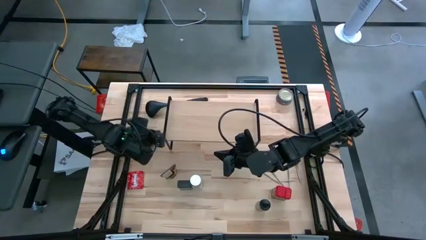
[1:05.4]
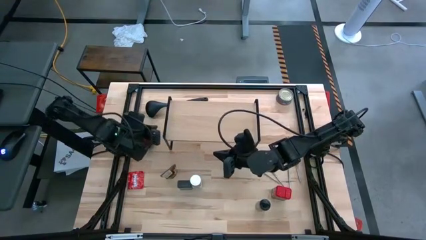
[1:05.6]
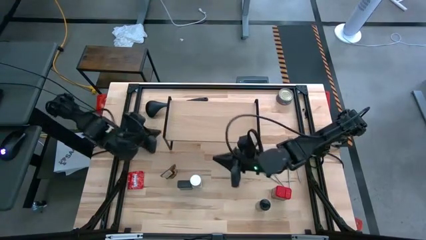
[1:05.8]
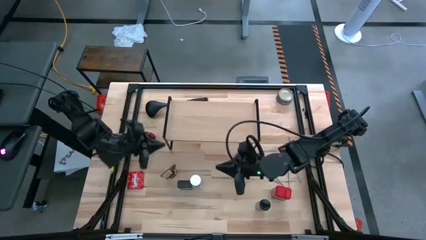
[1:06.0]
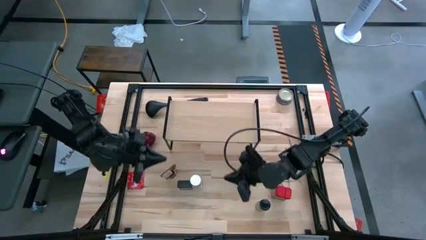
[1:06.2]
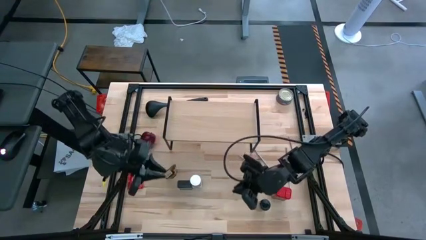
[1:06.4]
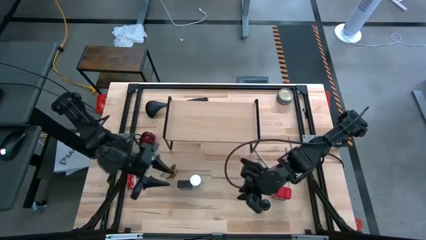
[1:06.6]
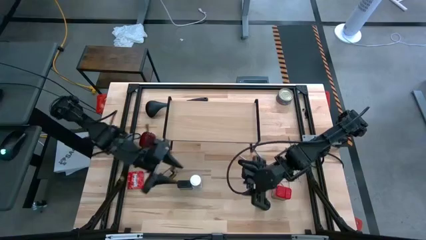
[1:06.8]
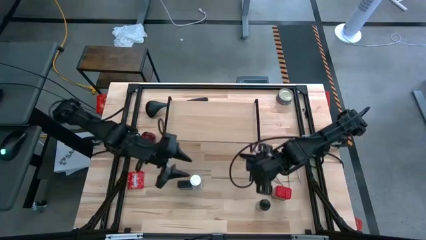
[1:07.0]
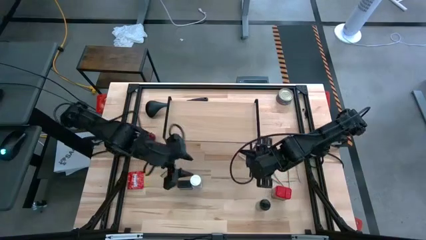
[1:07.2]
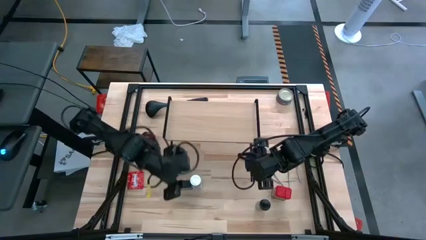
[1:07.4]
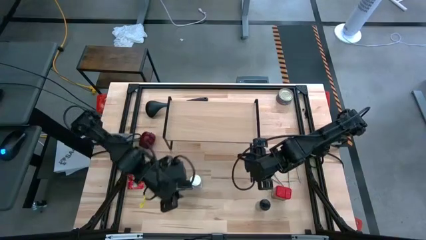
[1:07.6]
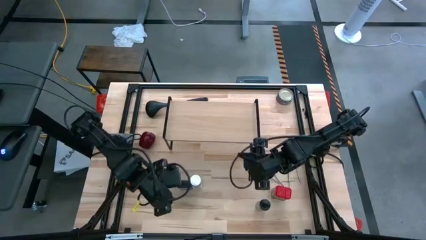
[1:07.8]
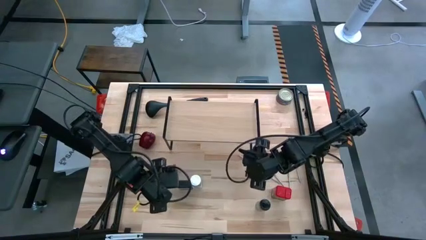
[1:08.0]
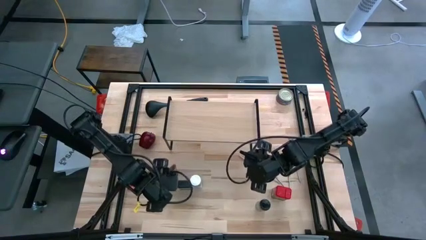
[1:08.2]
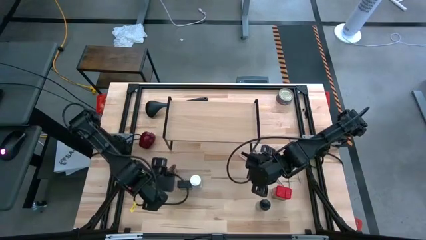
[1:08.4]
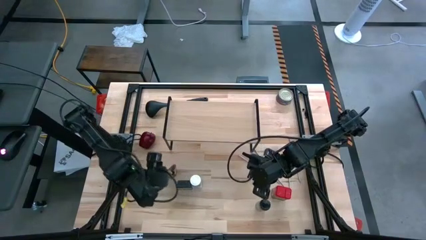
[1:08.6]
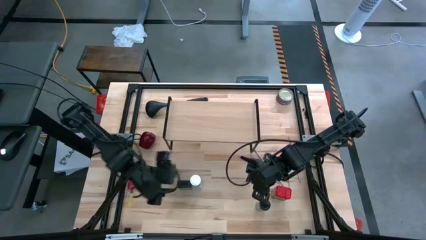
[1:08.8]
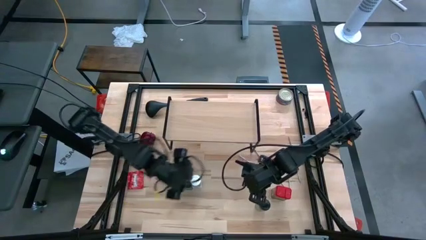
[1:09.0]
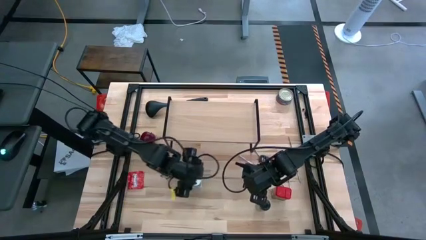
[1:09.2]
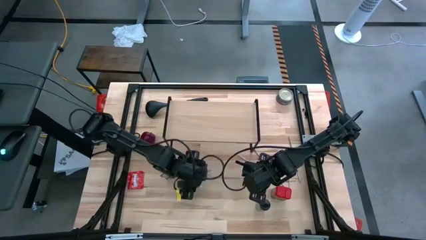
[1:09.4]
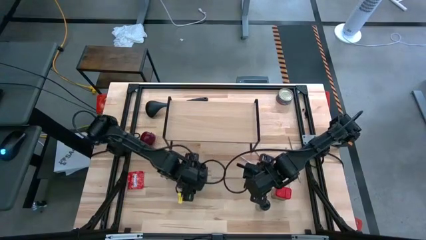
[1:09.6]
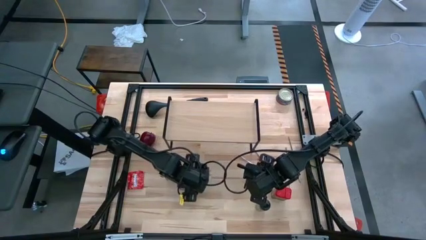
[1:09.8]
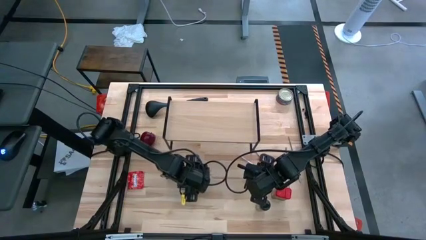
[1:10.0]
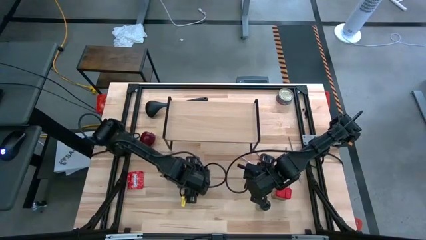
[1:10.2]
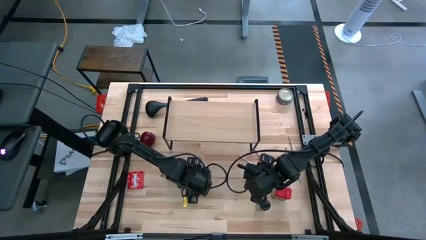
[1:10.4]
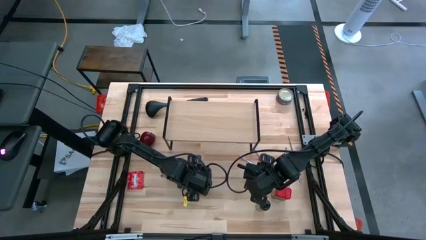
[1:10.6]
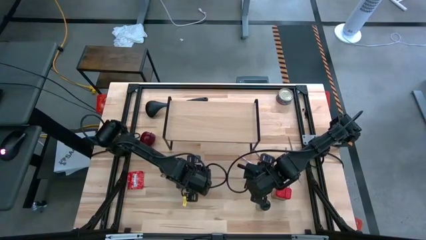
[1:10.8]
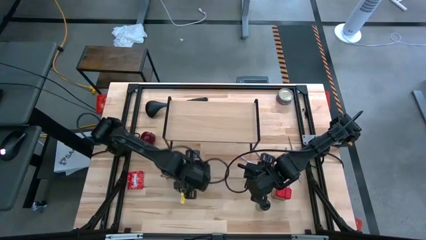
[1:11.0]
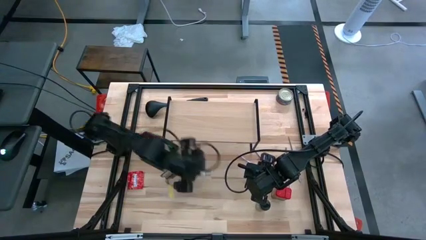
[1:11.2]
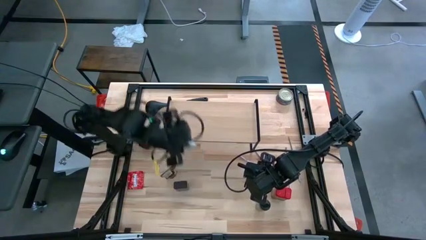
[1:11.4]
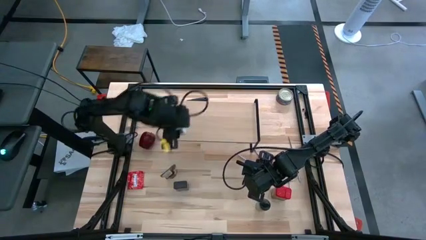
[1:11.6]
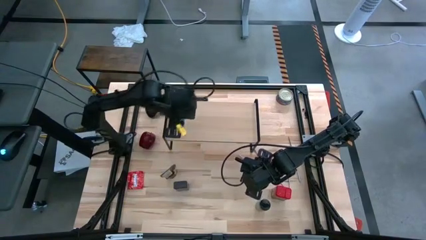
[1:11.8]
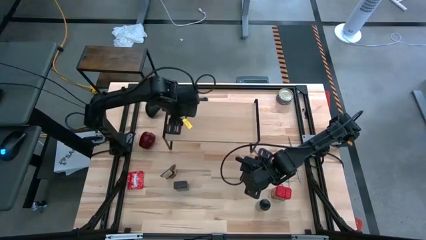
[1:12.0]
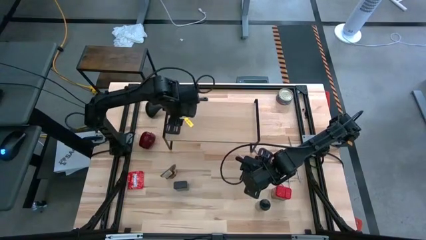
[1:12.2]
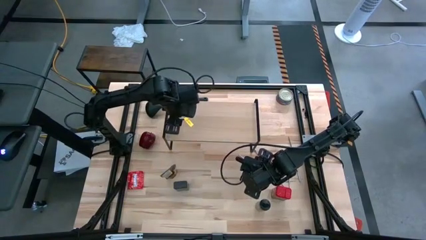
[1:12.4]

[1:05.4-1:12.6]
Task: Shelf spices
Put the white seasoning bottle on the shelf

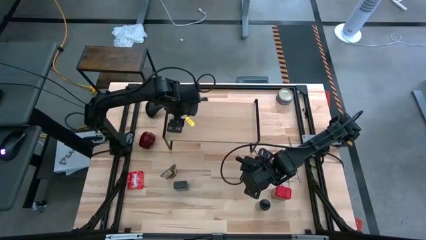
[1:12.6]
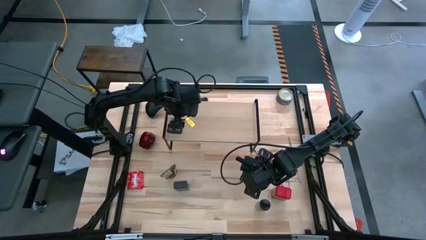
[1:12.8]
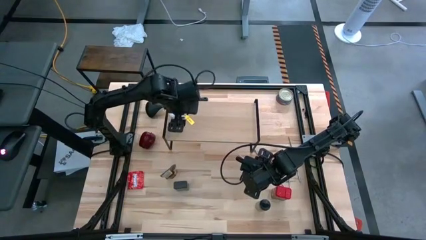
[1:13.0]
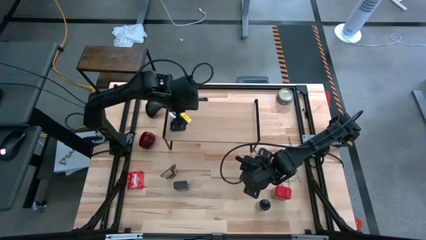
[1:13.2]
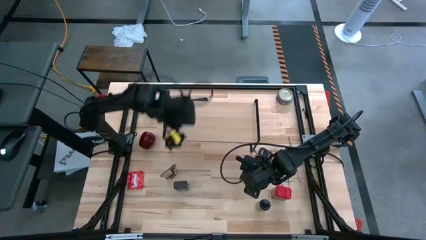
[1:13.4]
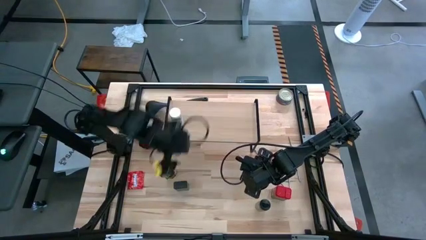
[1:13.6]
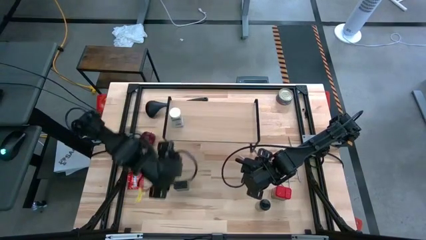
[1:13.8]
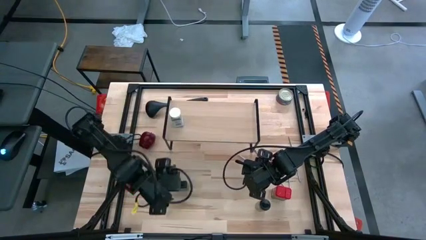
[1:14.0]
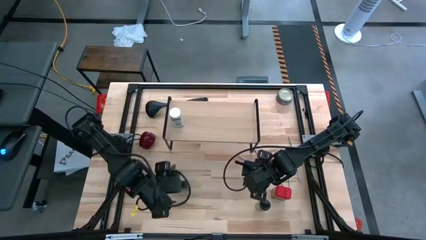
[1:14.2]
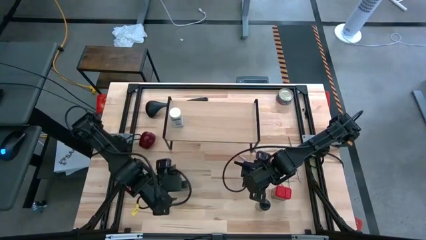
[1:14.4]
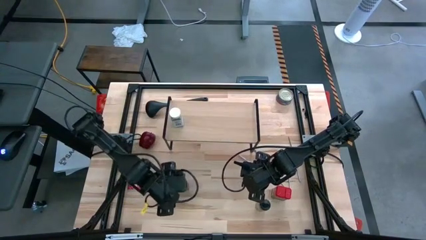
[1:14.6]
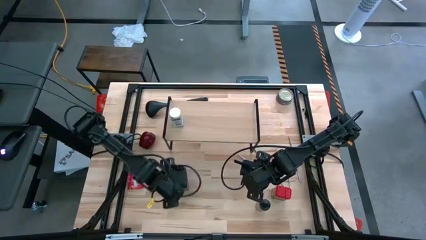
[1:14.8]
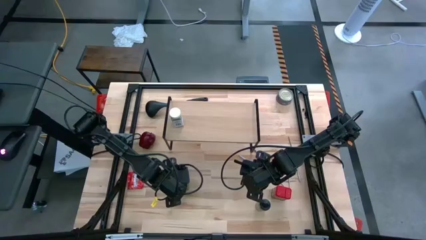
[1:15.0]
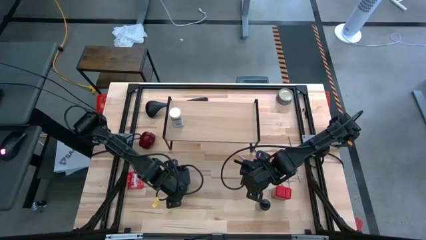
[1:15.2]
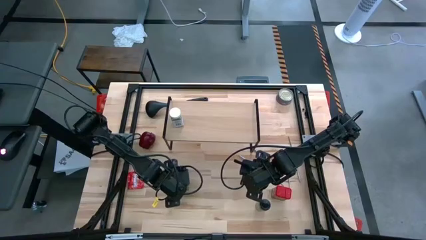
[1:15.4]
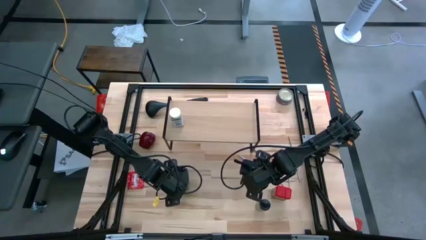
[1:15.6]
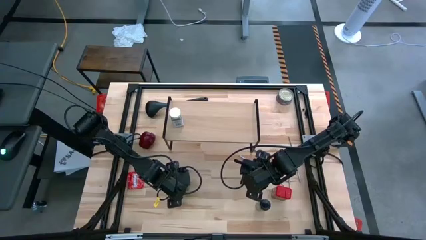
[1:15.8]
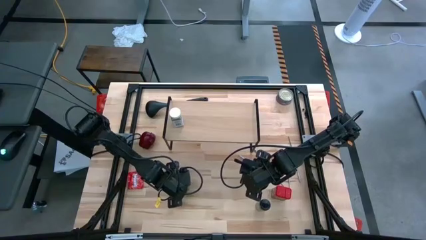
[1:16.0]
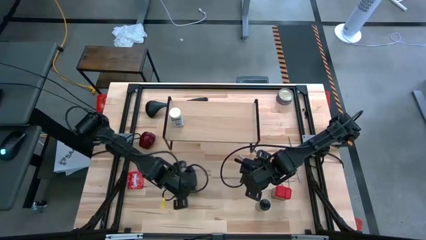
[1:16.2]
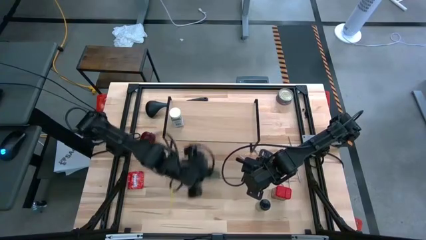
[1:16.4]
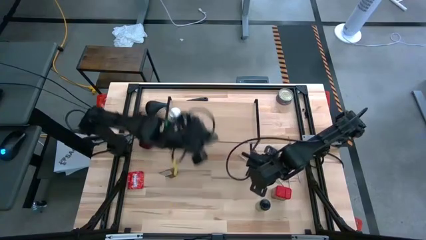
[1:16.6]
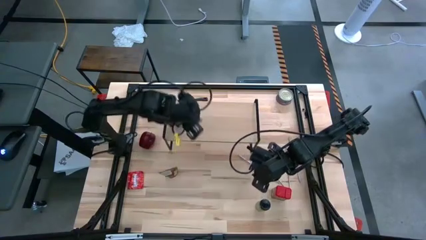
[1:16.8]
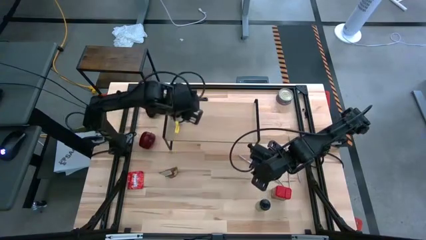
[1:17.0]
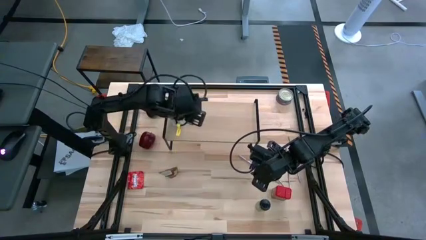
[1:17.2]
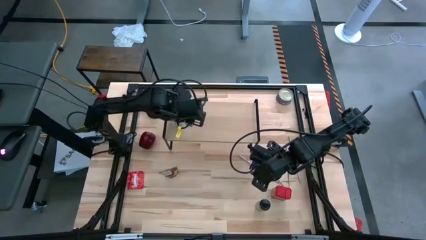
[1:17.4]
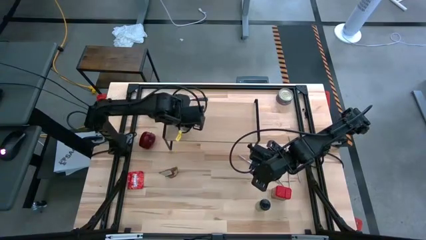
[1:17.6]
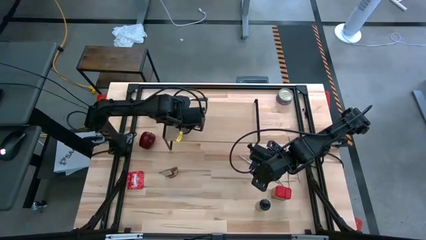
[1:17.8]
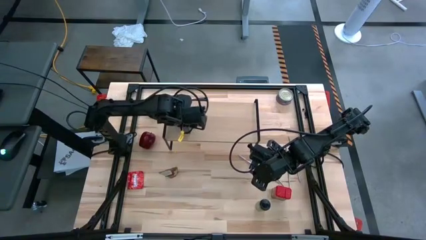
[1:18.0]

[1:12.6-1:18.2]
Put the black seasoning can on the shelf
